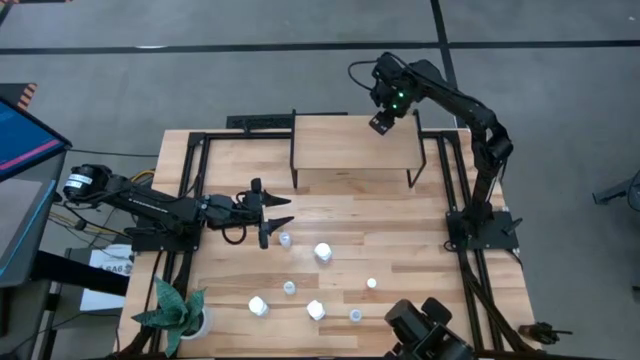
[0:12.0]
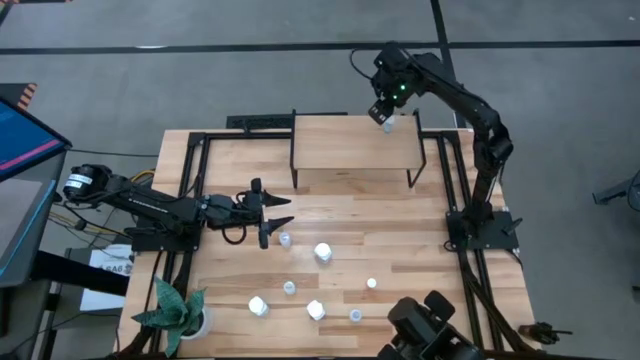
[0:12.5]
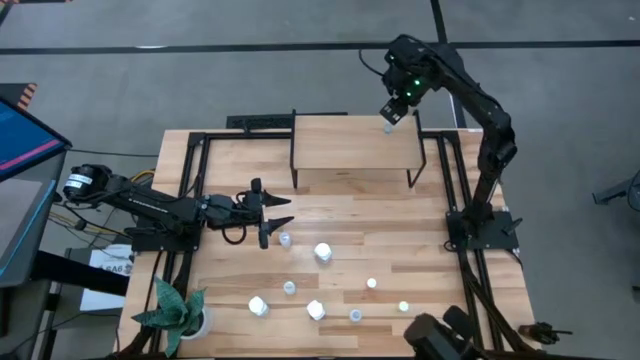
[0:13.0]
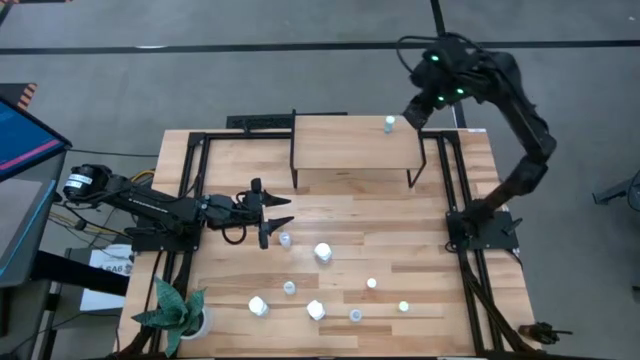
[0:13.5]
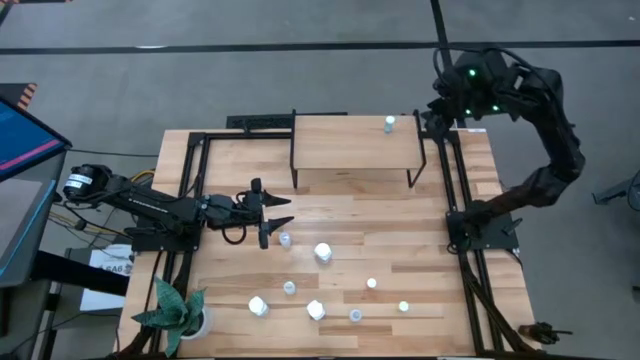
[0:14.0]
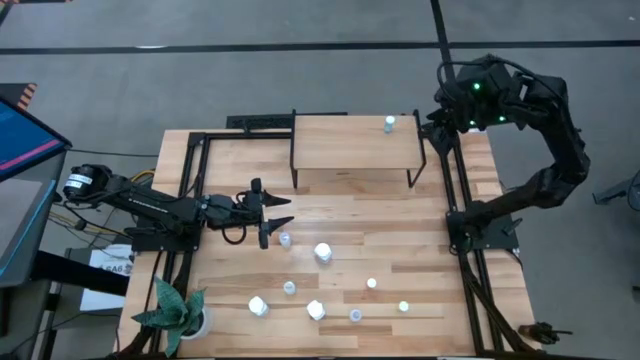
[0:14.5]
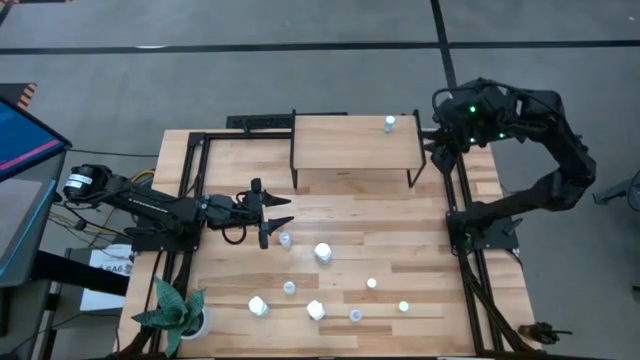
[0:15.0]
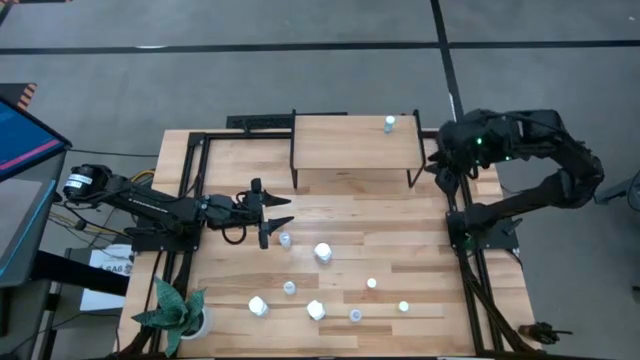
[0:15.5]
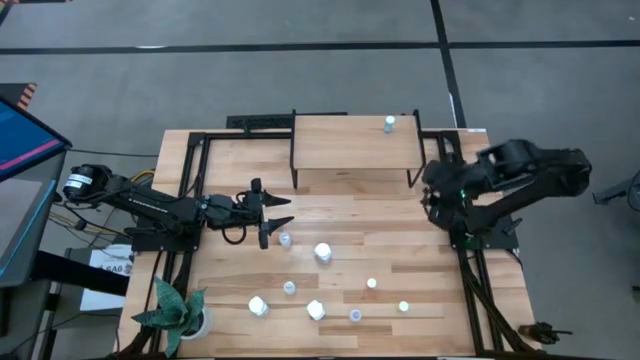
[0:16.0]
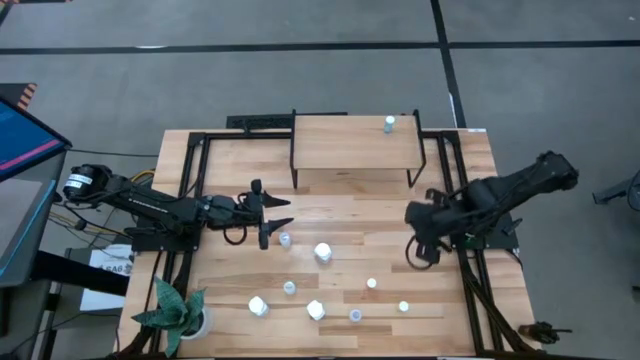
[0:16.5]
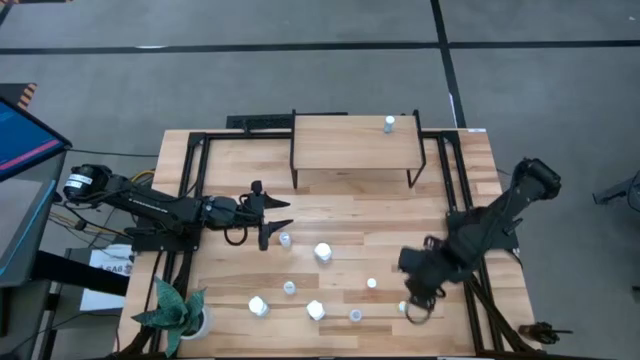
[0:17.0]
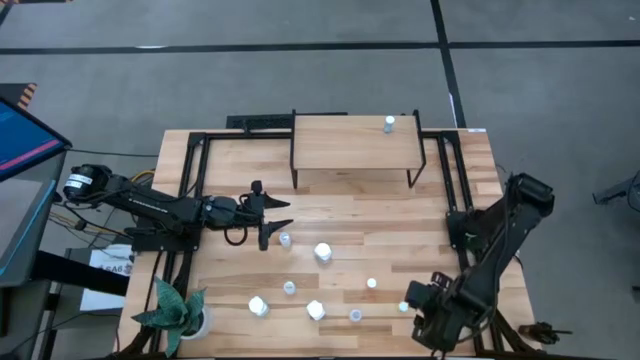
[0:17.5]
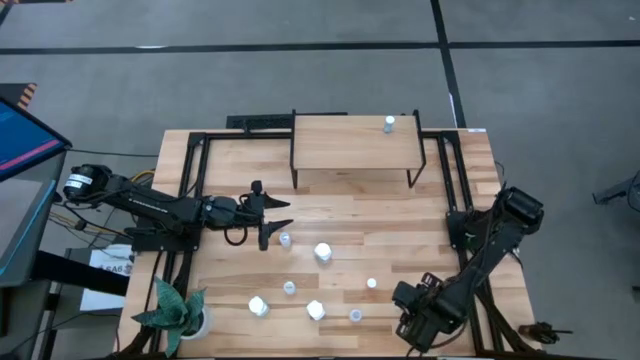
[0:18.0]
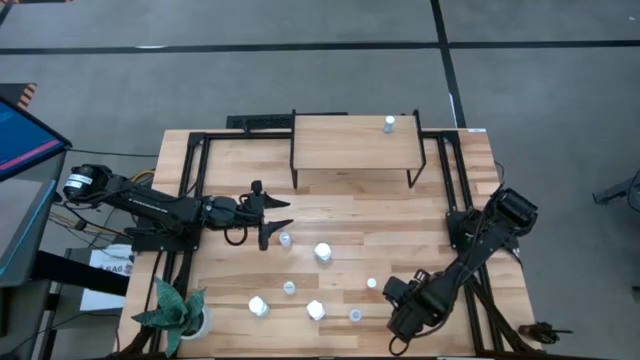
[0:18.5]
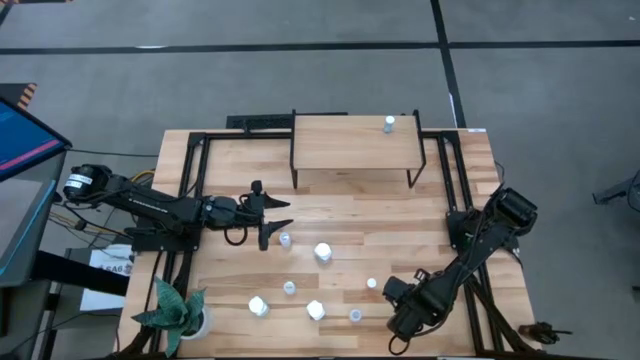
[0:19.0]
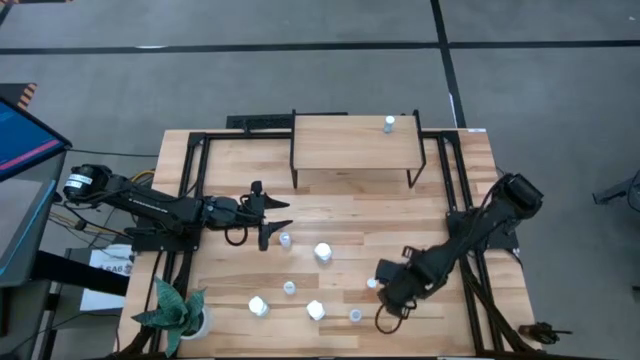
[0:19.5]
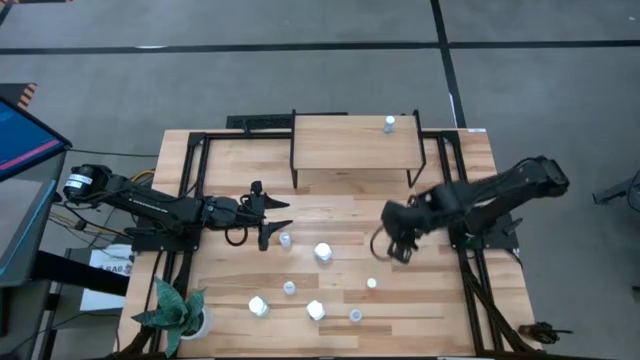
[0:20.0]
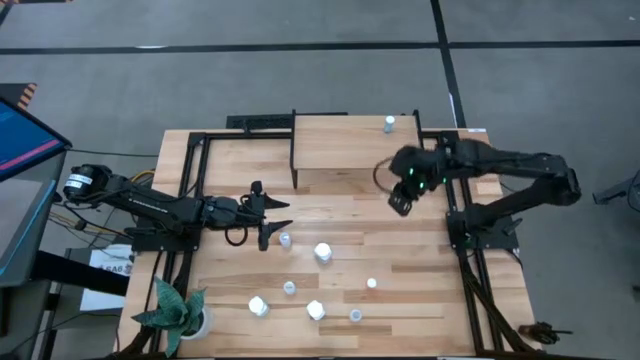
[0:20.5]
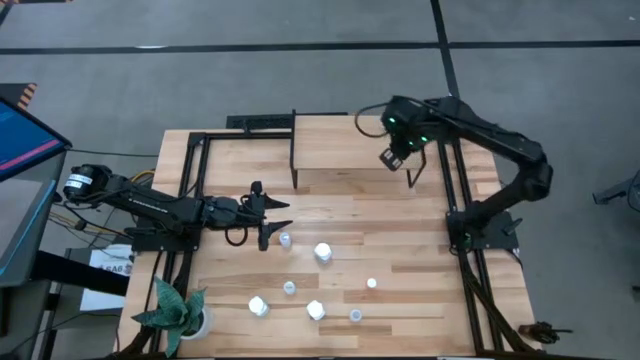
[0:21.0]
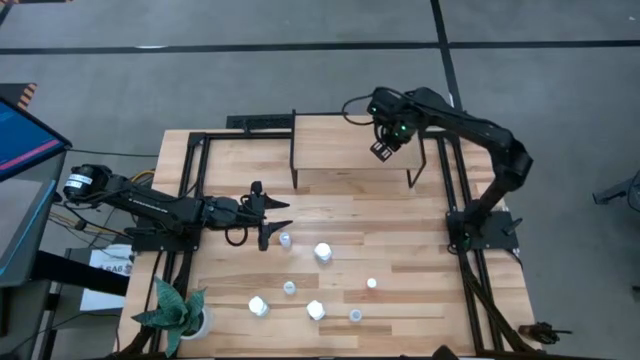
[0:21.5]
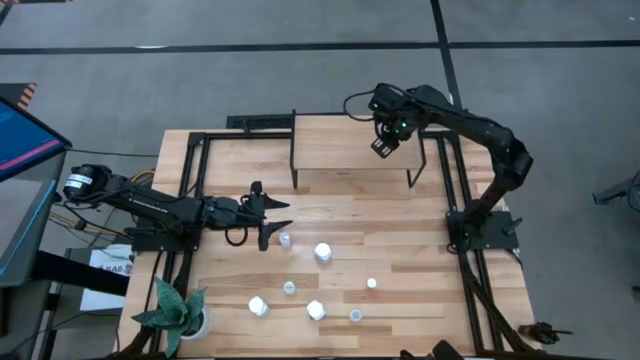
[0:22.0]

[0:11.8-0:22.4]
Task: Pick and place medicine bottles onto shelf by color
Put the yellow pill bottle on the shelf

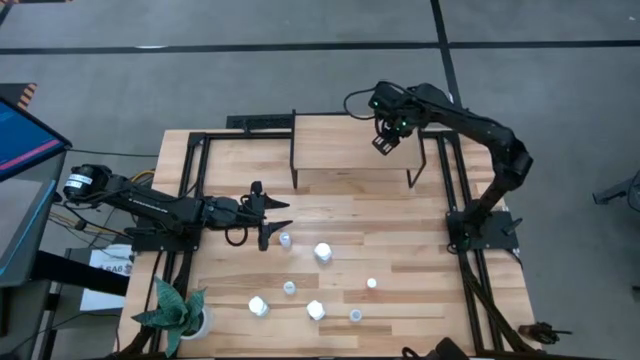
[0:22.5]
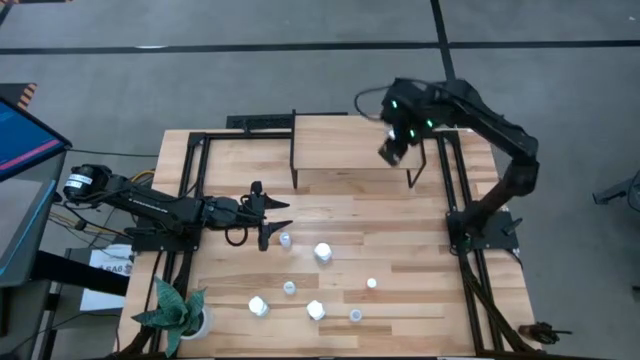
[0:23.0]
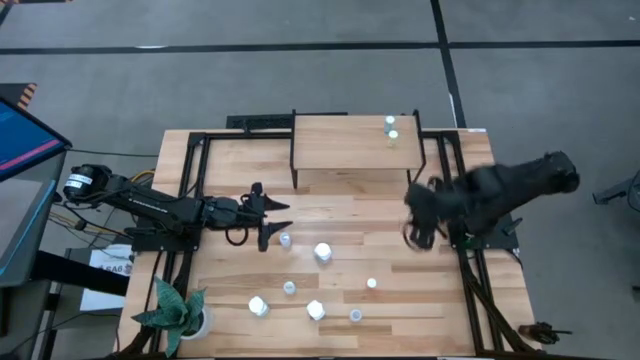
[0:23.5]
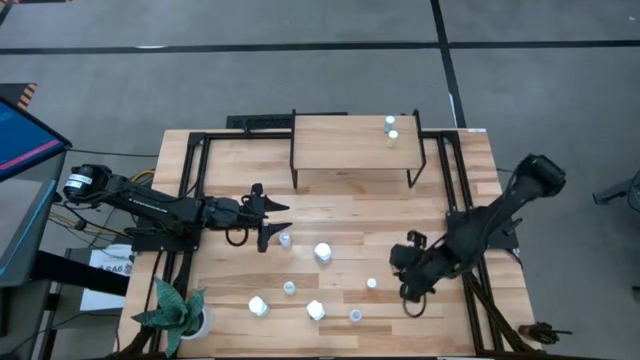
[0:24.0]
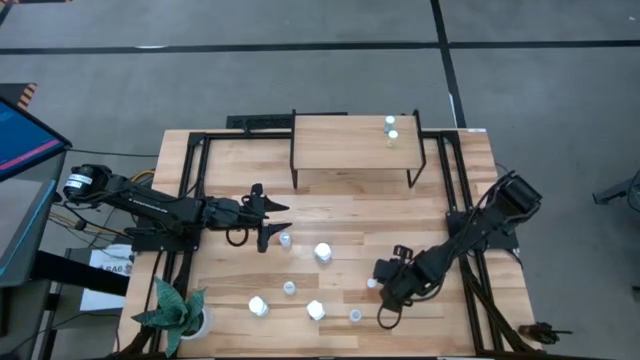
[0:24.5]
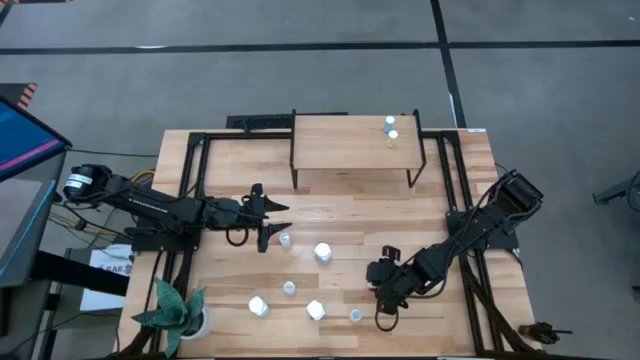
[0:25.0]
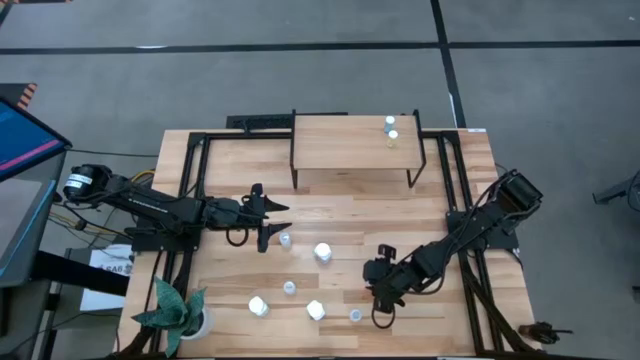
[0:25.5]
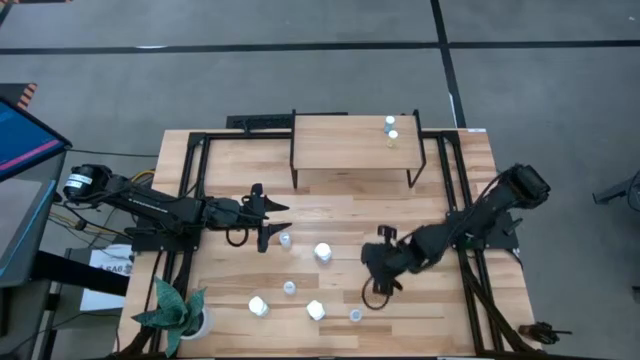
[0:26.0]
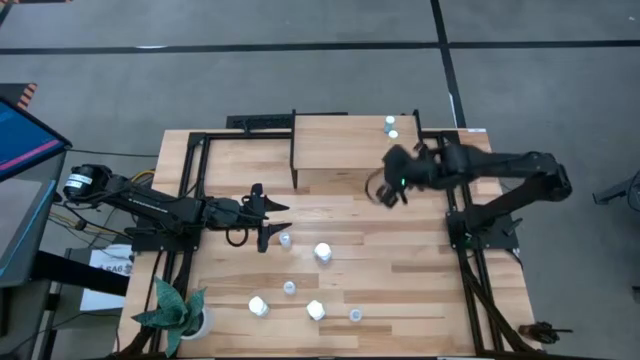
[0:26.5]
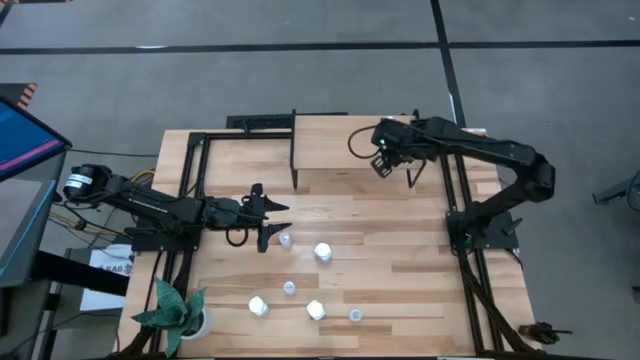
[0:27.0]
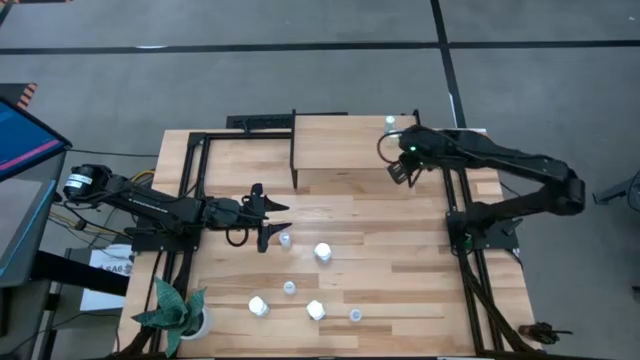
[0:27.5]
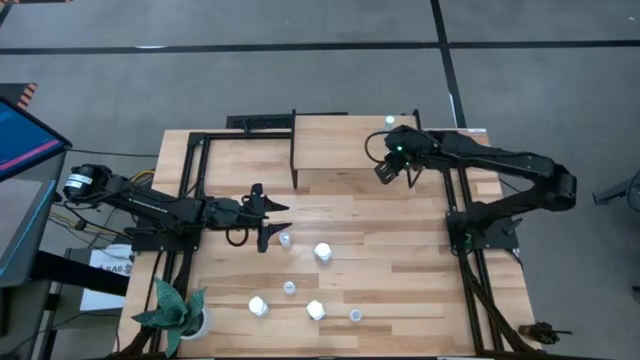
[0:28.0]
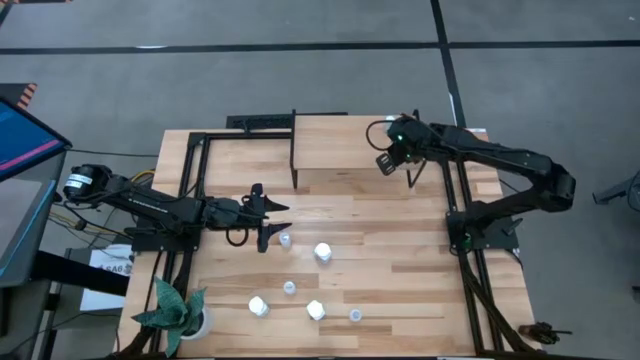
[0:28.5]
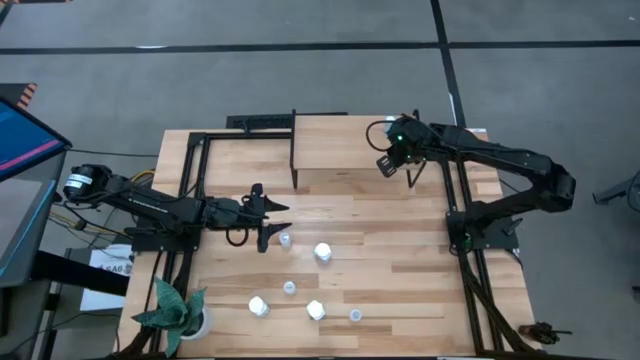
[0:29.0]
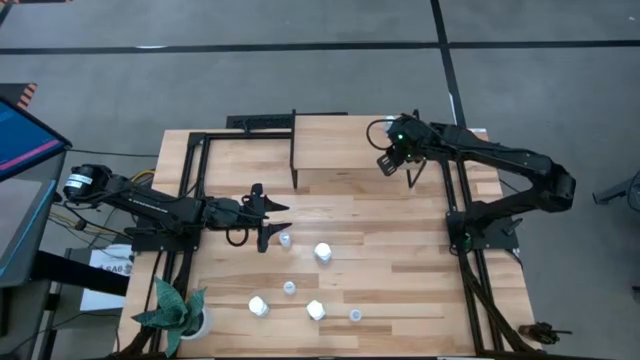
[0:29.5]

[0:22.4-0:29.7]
Put the orange pill bottle on the shelf

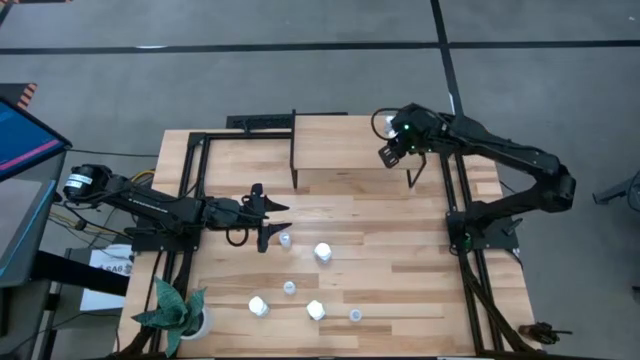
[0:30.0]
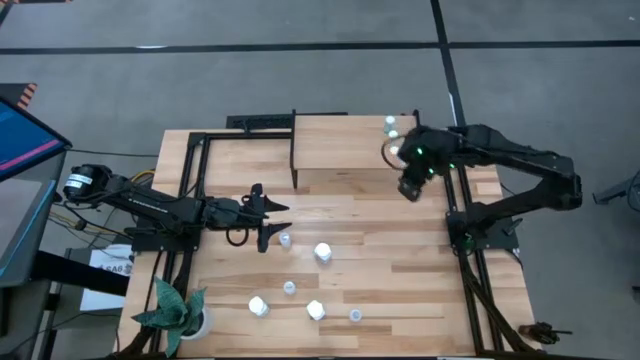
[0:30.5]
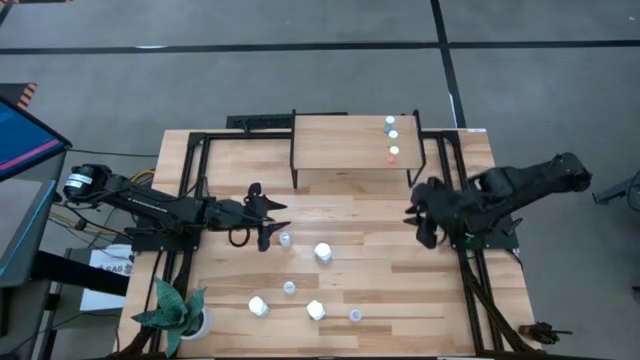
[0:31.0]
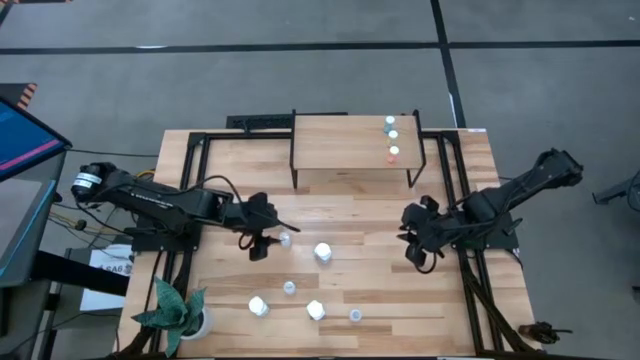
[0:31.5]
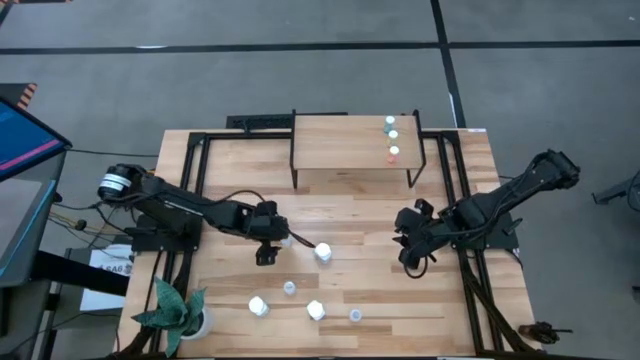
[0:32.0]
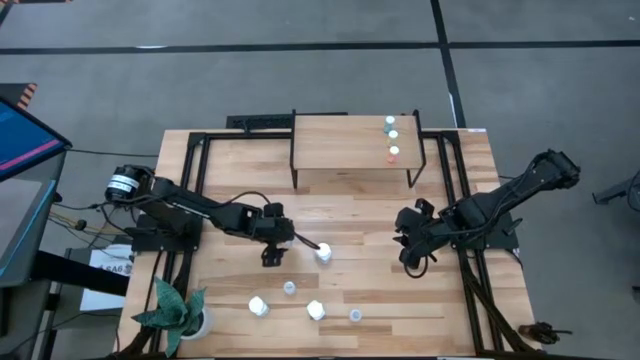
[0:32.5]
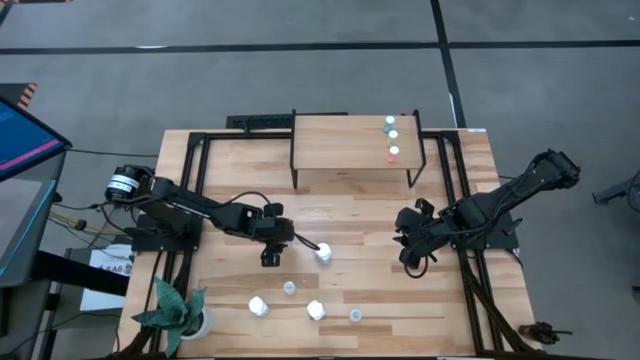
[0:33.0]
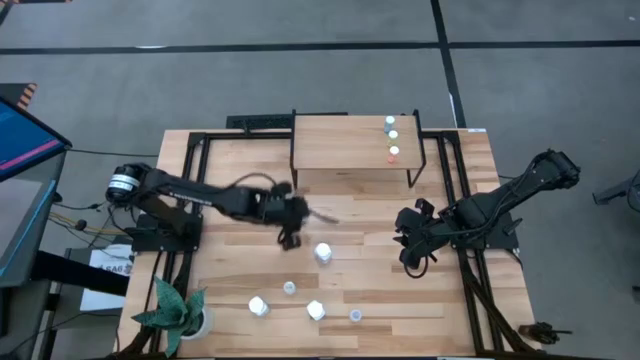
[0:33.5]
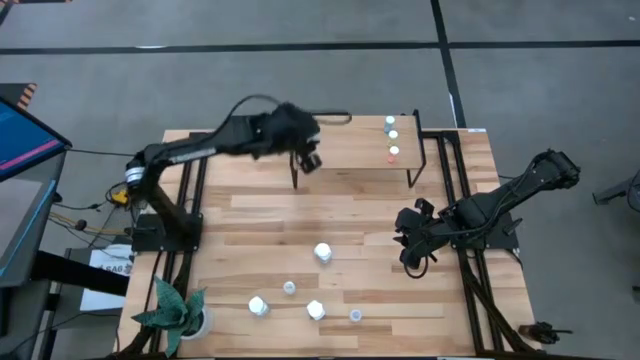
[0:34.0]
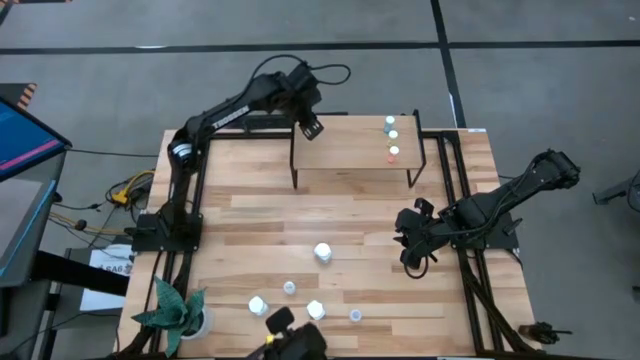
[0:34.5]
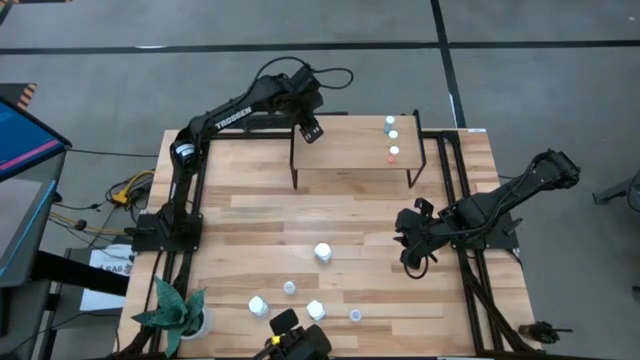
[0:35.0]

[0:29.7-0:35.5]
Put the top white small pill bottle on the shelf
